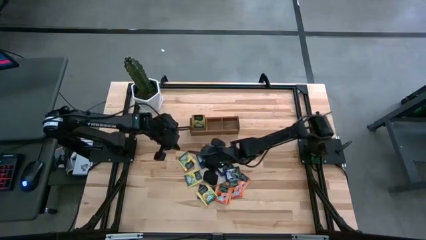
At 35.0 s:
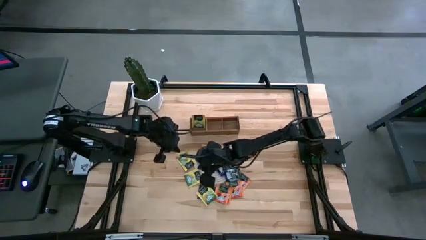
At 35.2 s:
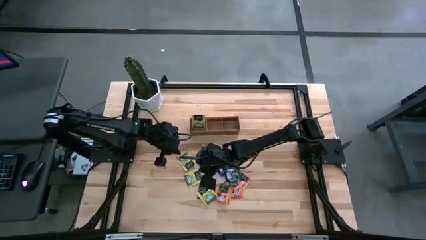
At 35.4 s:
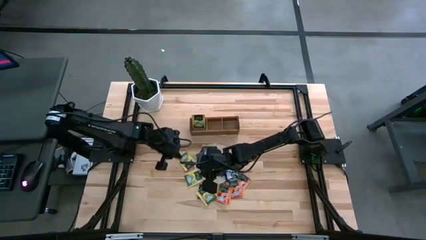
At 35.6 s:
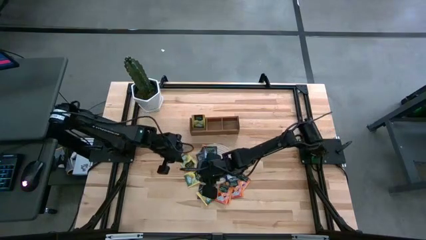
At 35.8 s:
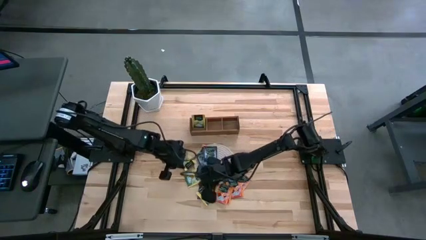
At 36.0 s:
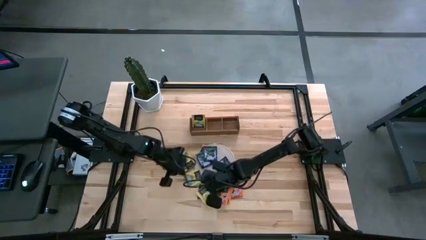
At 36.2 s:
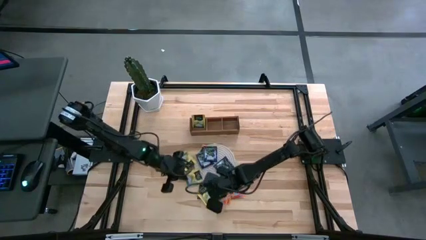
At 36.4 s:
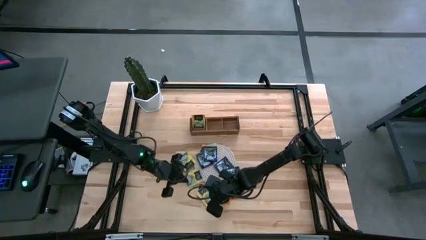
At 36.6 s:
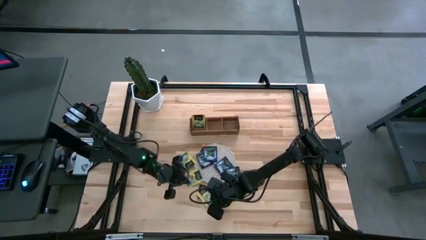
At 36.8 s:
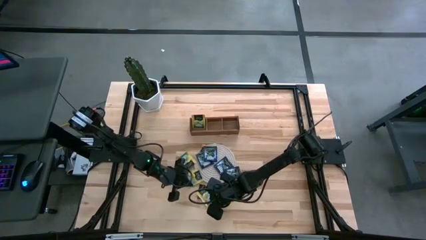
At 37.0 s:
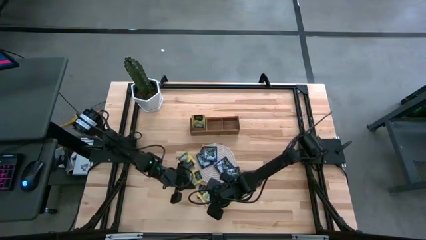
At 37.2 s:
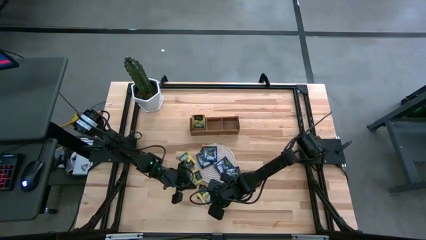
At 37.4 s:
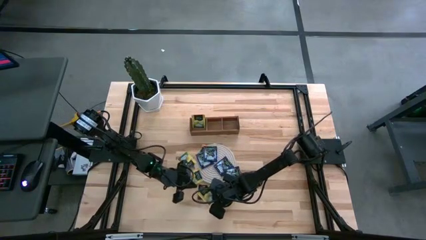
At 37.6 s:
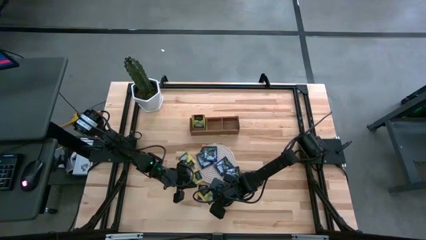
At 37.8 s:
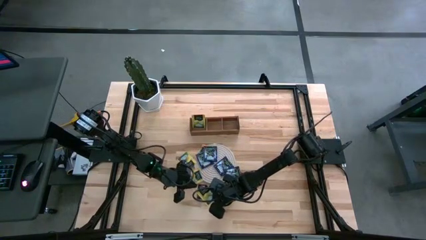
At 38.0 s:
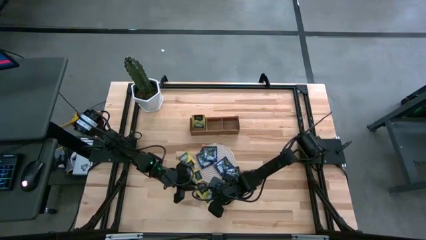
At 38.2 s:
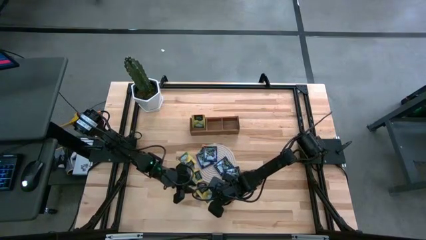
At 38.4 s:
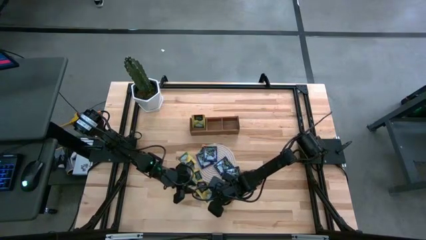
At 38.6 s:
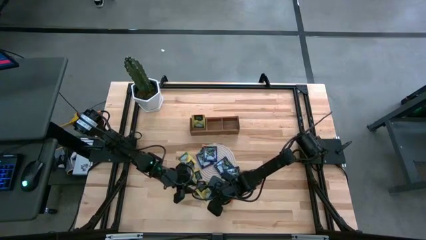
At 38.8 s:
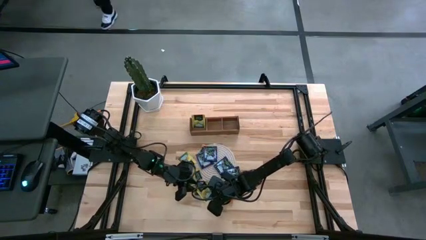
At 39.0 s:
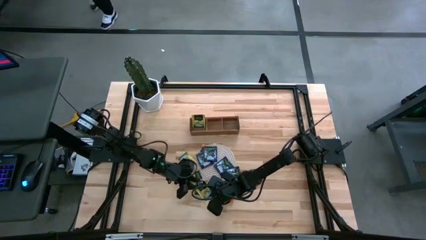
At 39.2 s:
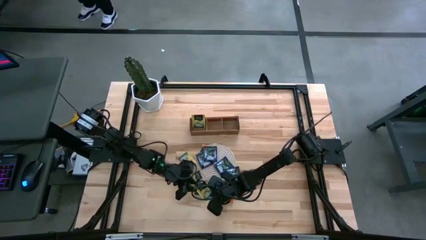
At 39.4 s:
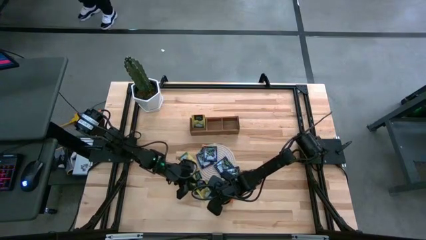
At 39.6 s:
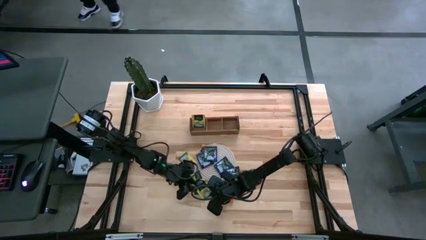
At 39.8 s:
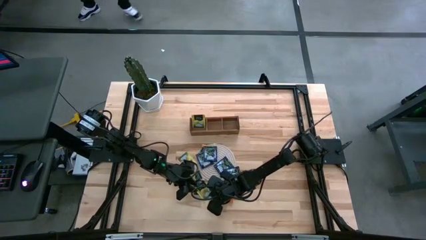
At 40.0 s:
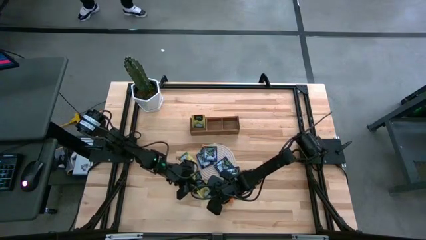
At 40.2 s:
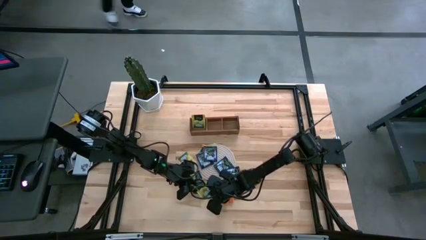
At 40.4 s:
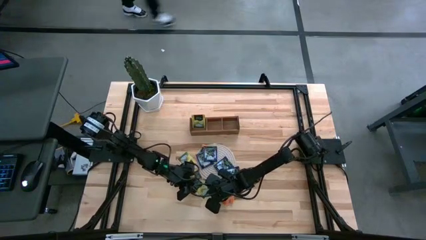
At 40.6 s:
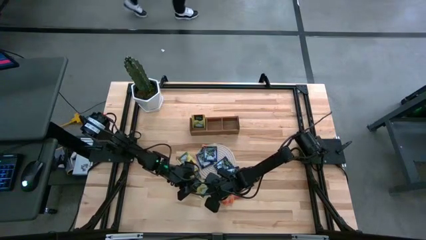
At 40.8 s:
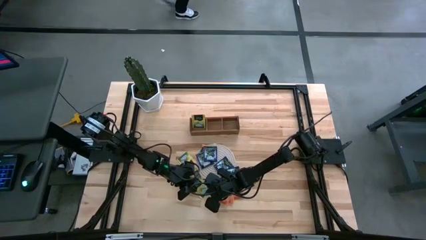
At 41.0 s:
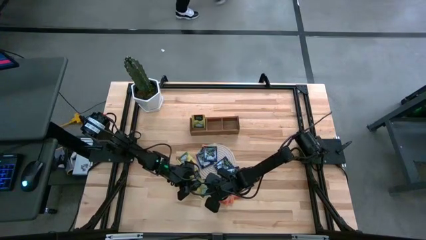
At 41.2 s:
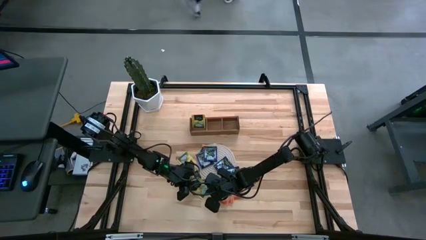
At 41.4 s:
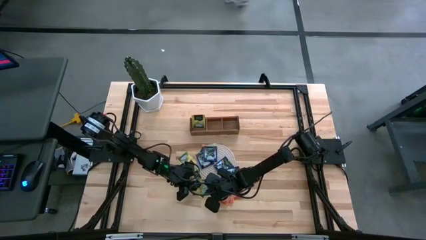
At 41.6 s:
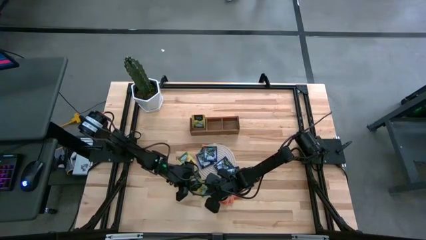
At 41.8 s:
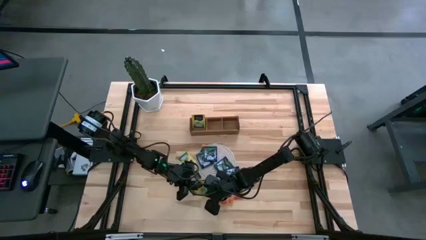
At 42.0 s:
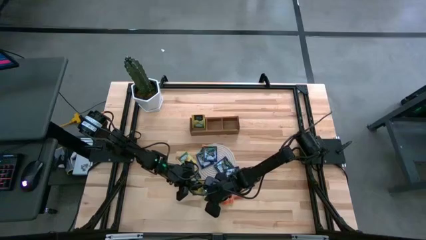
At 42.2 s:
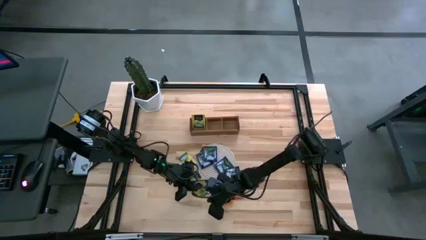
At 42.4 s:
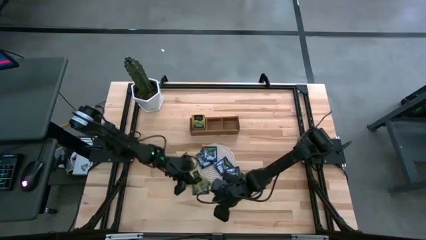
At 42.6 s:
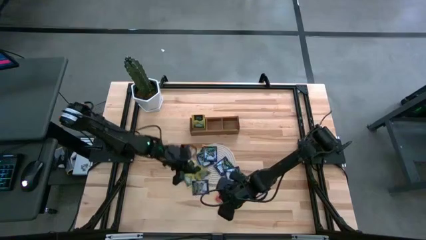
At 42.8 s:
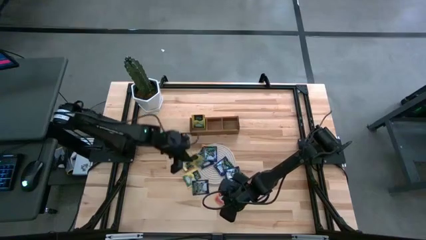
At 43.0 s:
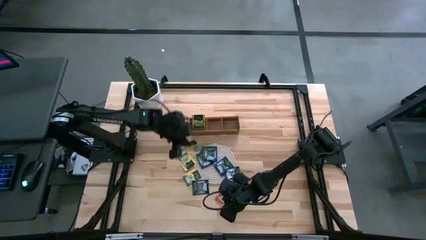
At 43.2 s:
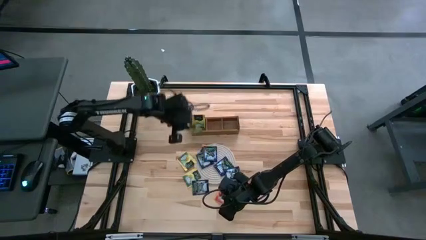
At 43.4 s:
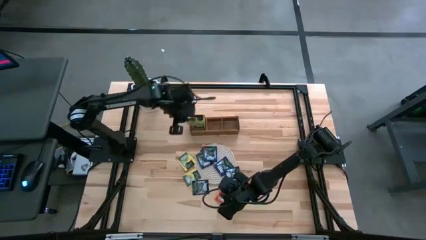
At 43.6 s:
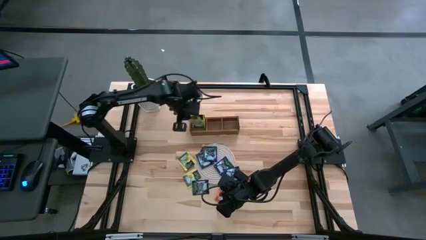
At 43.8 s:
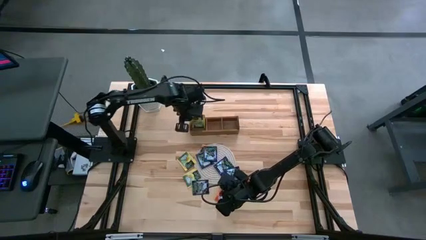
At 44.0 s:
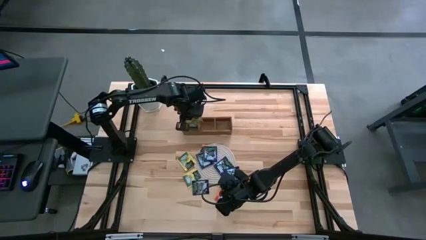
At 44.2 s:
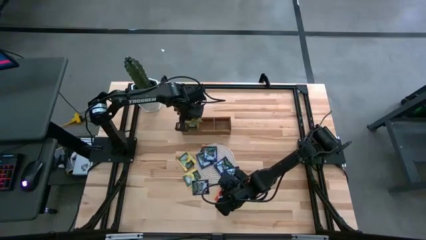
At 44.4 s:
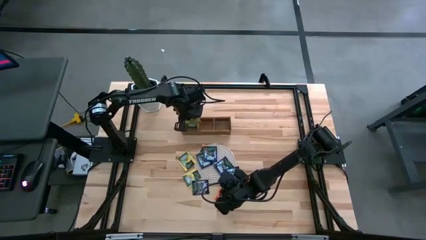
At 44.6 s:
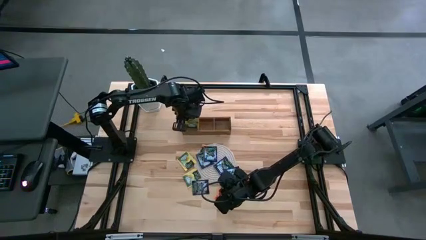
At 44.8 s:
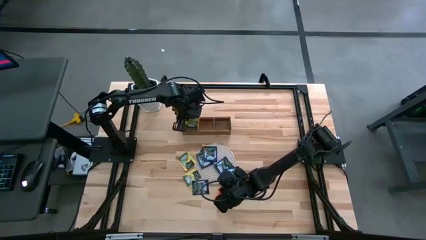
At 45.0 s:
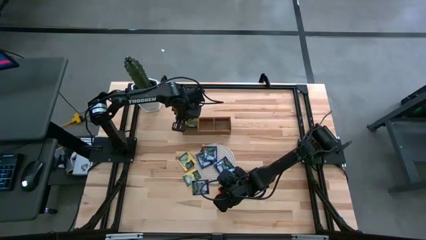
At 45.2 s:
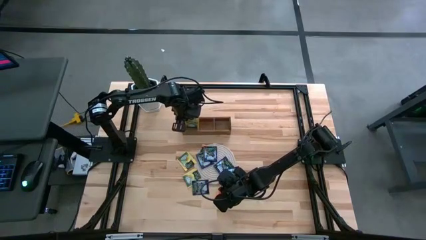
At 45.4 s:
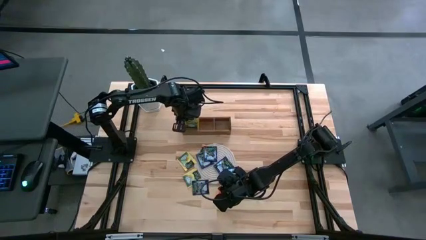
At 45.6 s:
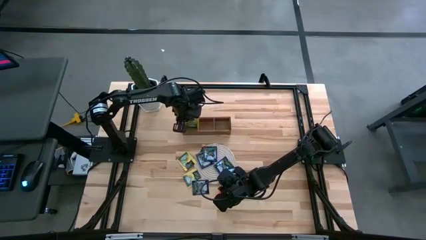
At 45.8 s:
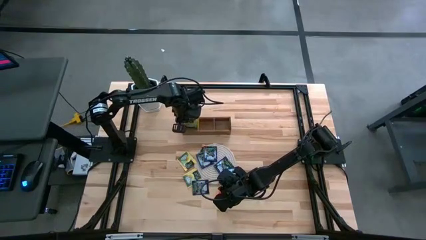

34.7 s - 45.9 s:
Task: Pick & Place Tea
Put the yellow tea bag into the left section of the wooden organizer

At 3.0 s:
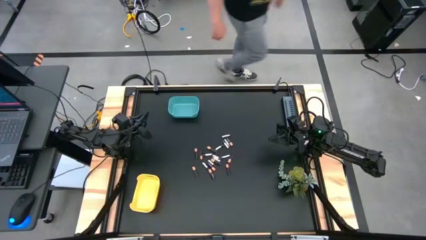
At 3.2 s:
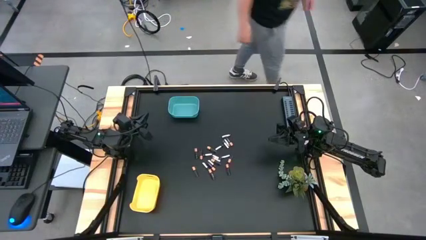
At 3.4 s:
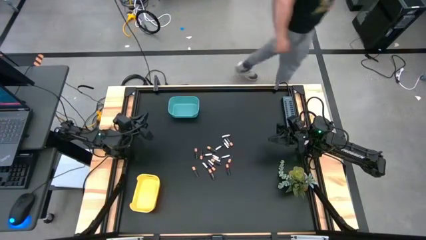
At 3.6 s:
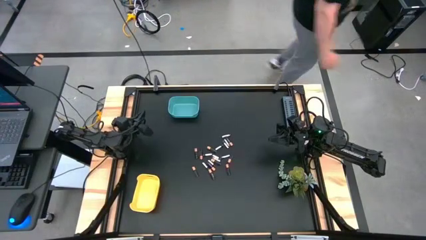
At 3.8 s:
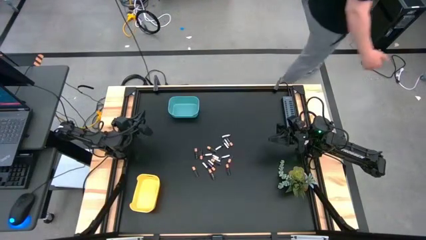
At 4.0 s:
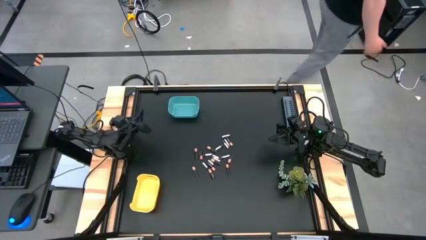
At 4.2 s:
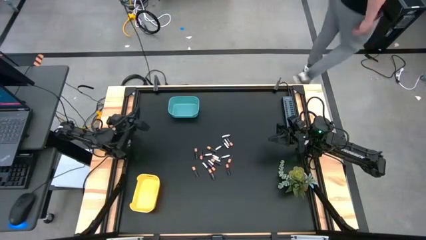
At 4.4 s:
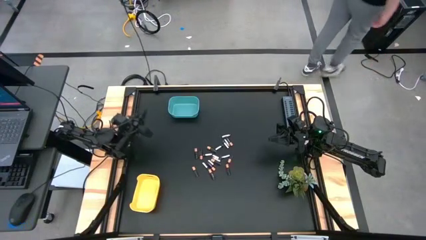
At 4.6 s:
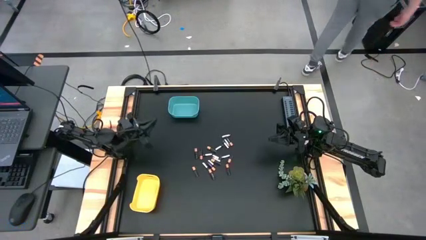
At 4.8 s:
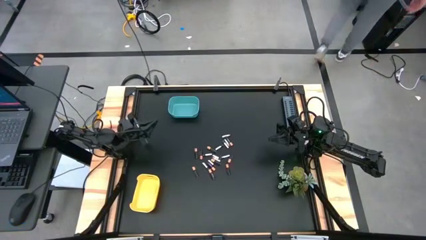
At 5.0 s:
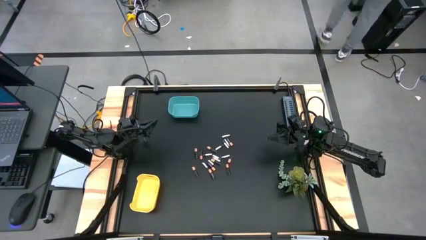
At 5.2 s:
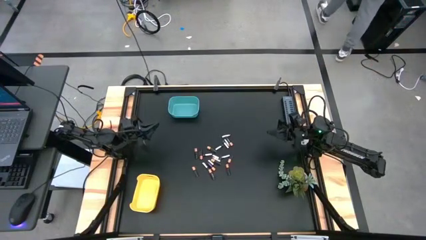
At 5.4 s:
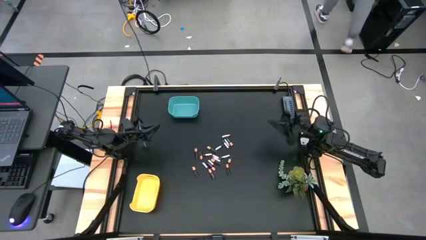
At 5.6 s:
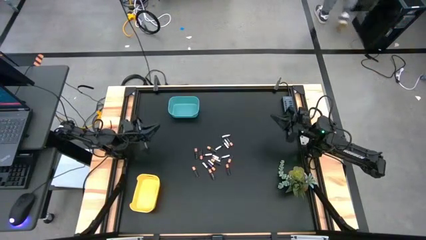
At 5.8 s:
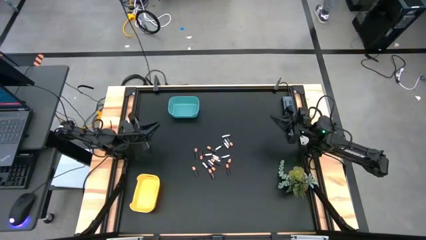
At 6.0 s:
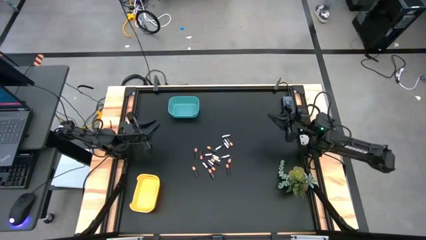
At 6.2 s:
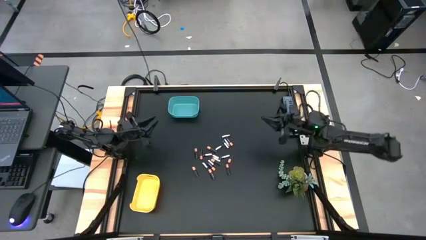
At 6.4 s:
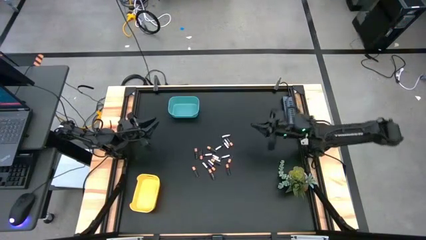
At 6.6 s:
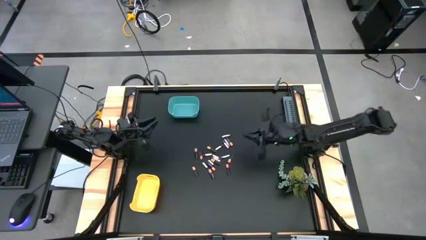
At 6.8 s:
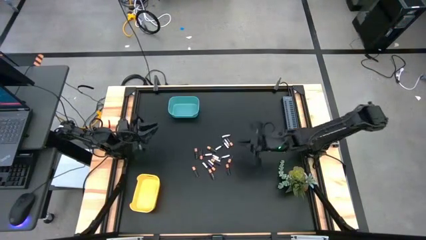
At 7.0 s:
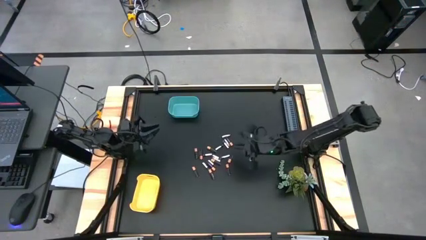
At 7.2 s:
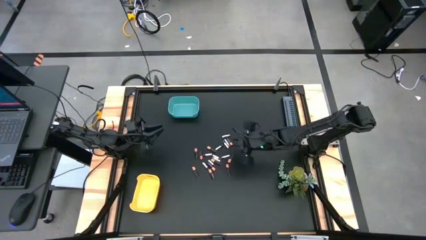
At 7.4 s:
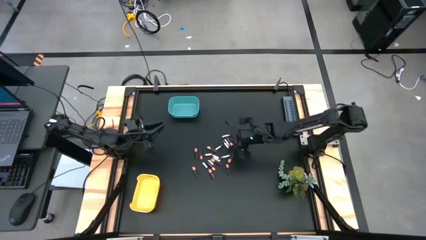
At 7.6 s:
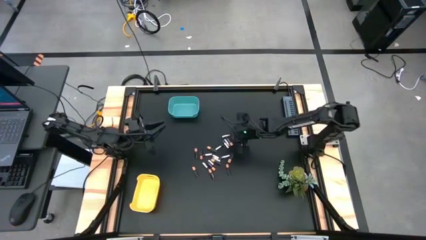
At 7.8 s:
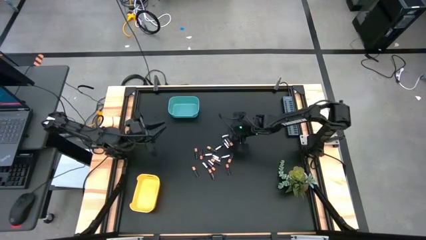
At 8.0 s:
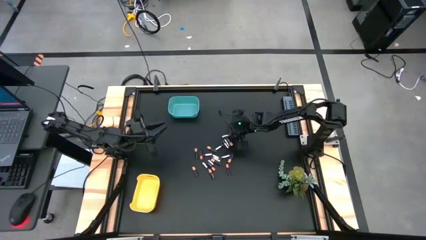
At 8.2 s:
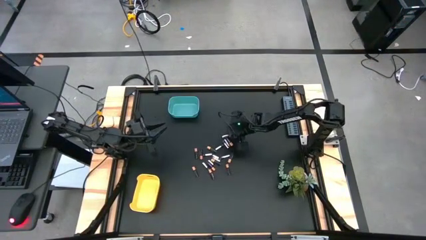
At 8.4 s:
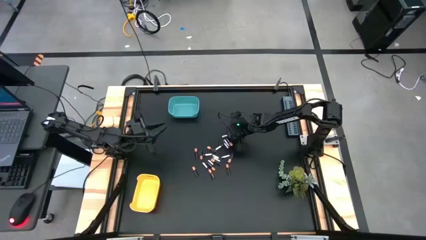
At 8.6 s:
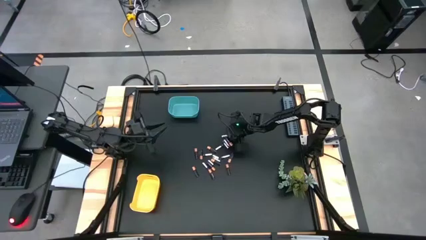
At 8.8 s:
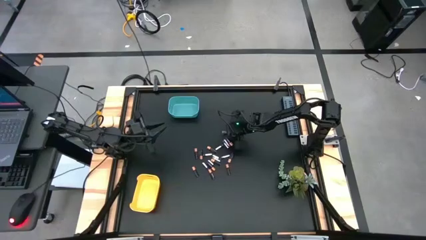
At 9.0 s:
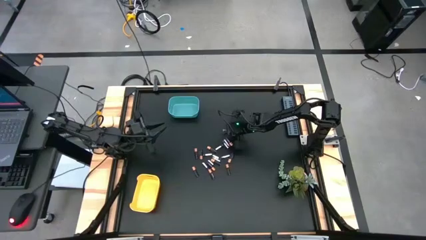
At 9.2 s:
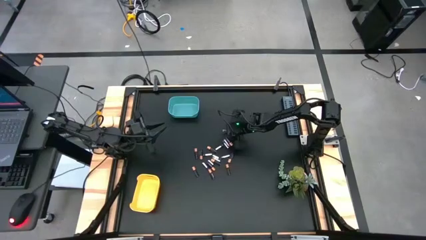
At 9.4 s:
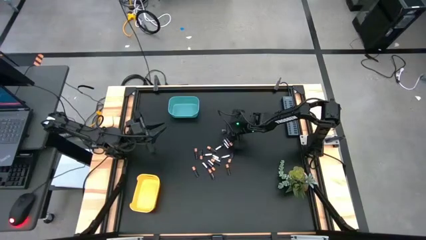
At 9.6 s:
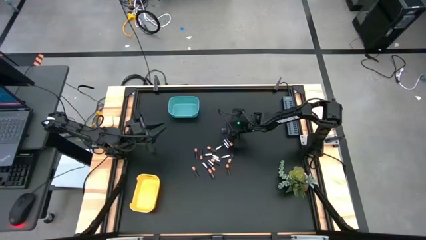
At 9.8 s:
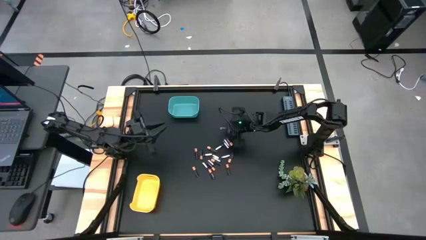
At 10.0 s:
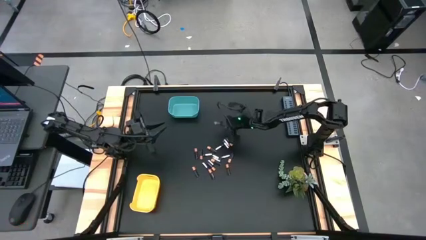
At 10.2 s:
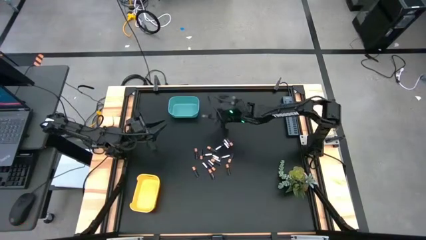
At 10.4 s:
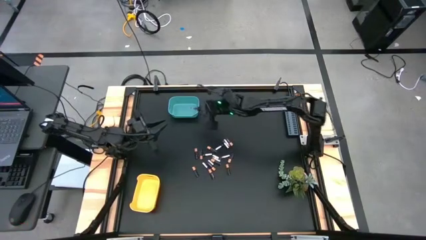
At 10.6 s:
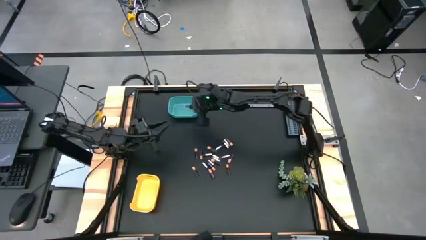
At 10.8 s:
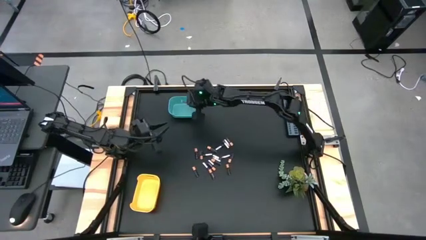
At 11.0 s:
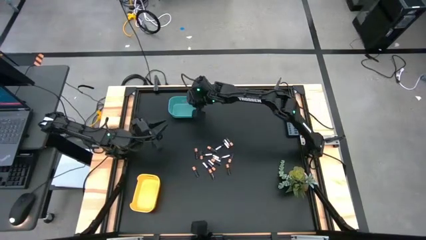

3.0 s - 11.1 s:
Task: Sort batteries
Put the silver battery into the green bin
